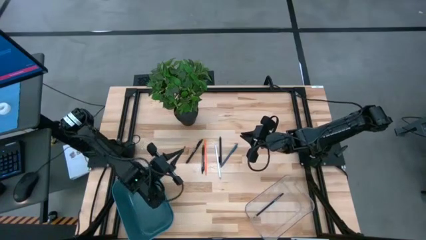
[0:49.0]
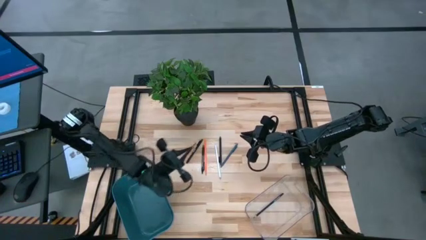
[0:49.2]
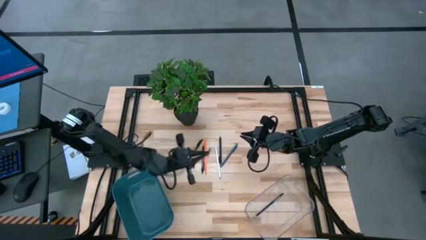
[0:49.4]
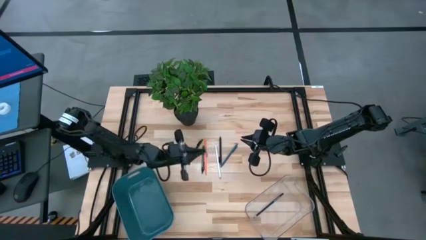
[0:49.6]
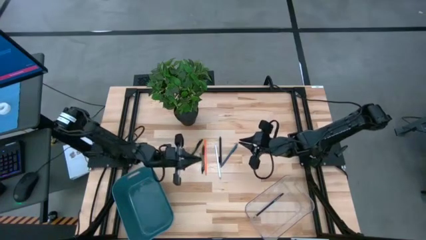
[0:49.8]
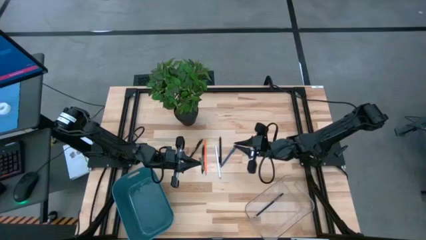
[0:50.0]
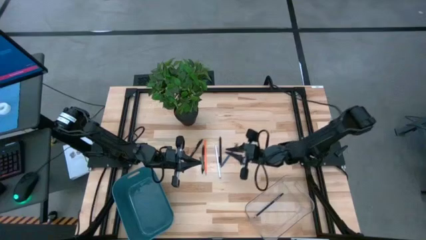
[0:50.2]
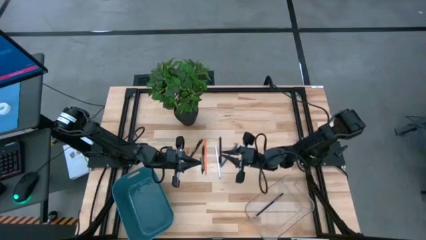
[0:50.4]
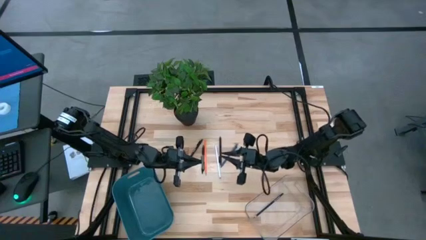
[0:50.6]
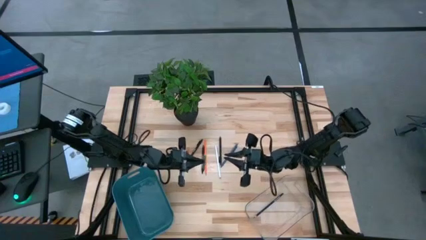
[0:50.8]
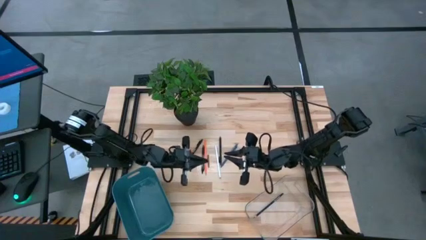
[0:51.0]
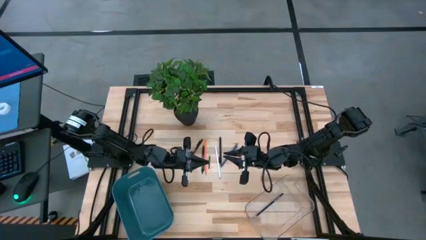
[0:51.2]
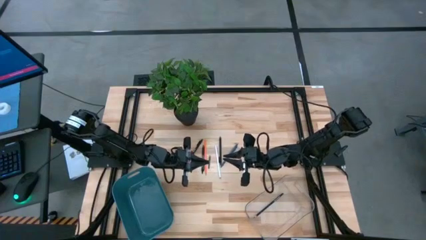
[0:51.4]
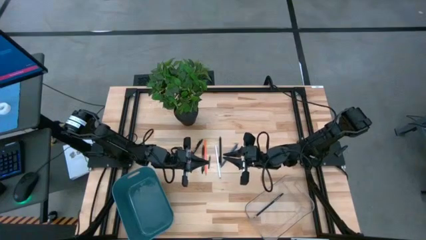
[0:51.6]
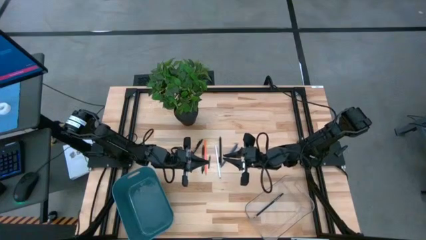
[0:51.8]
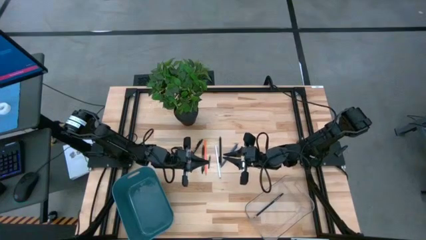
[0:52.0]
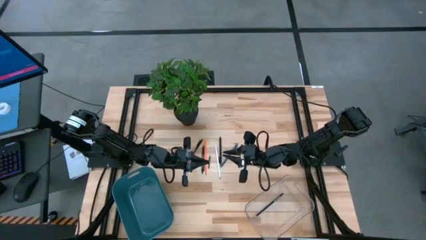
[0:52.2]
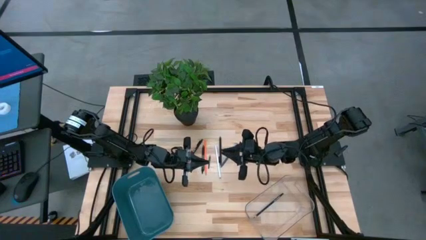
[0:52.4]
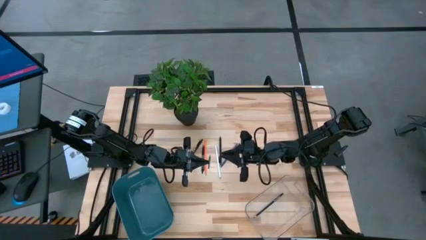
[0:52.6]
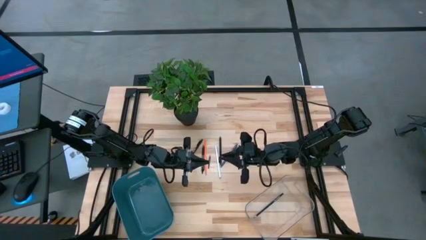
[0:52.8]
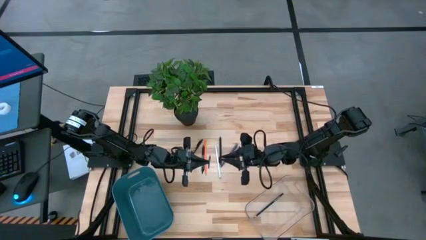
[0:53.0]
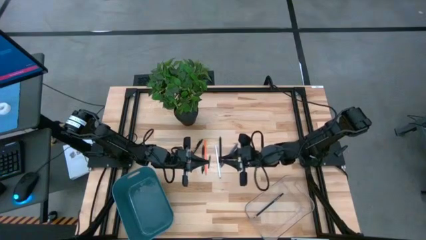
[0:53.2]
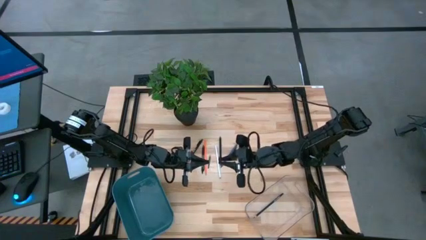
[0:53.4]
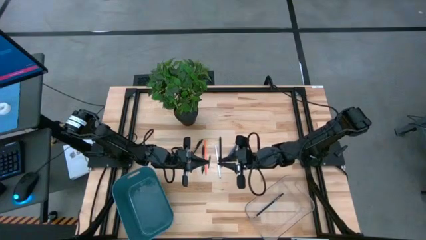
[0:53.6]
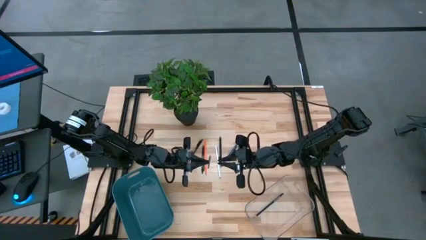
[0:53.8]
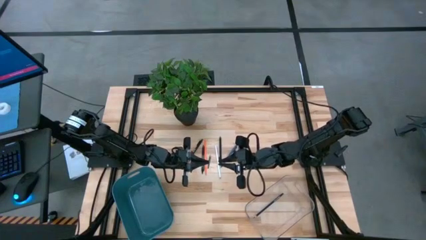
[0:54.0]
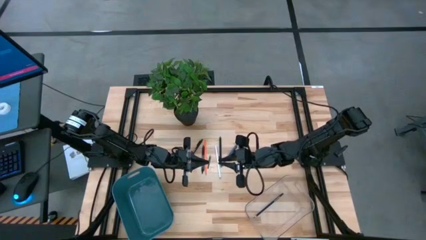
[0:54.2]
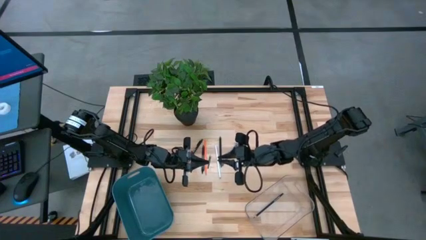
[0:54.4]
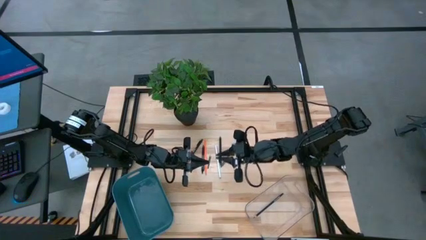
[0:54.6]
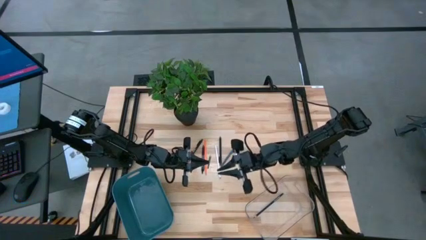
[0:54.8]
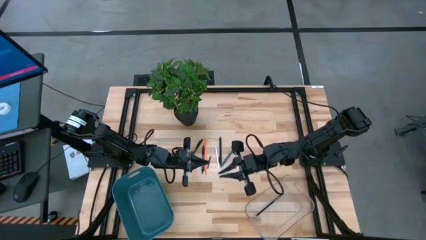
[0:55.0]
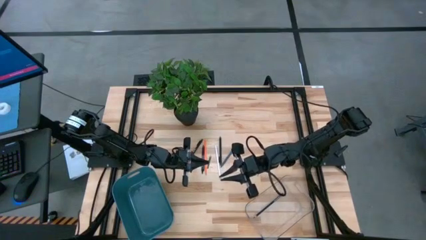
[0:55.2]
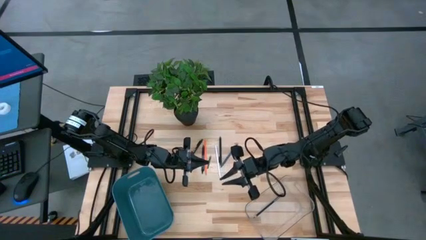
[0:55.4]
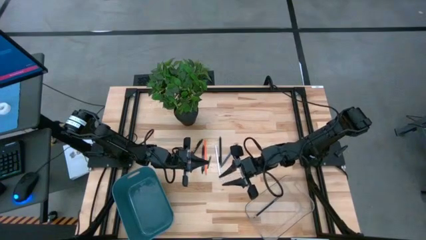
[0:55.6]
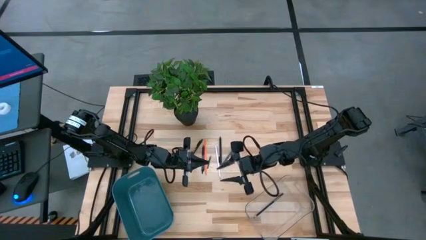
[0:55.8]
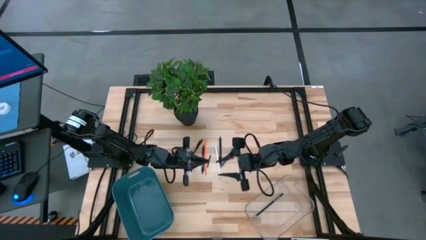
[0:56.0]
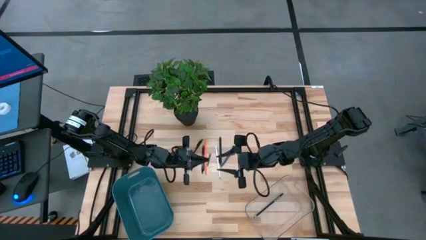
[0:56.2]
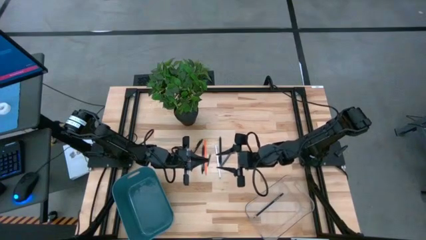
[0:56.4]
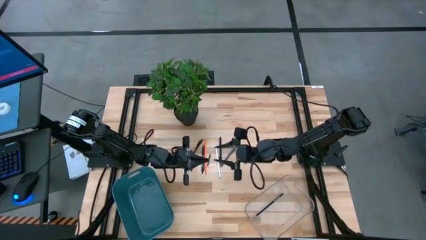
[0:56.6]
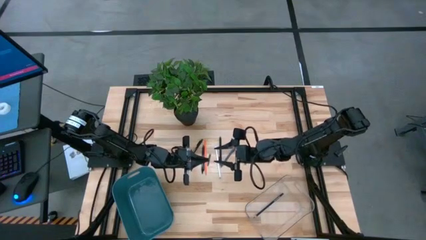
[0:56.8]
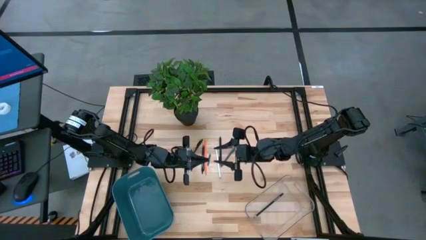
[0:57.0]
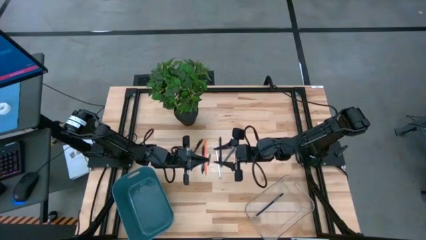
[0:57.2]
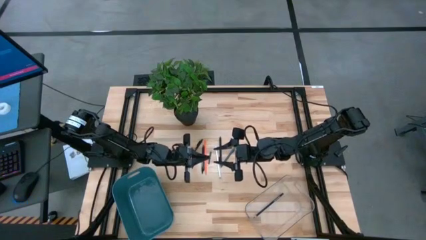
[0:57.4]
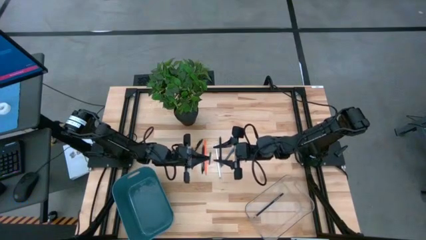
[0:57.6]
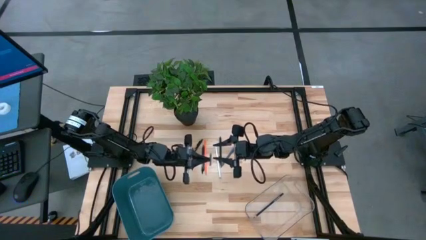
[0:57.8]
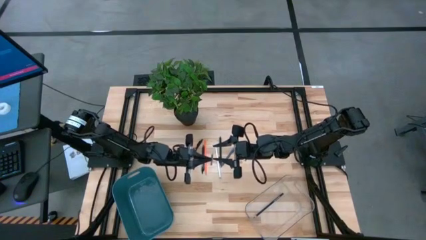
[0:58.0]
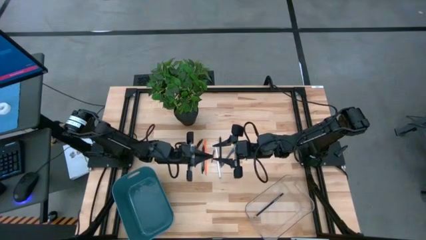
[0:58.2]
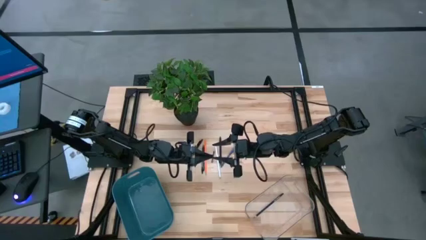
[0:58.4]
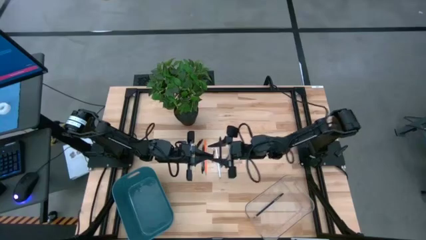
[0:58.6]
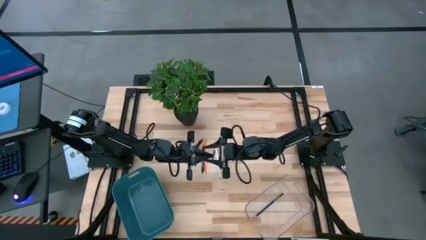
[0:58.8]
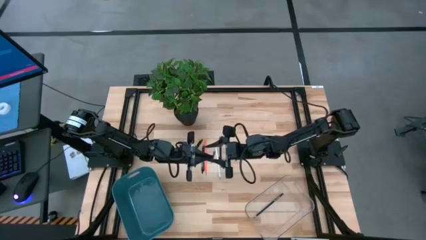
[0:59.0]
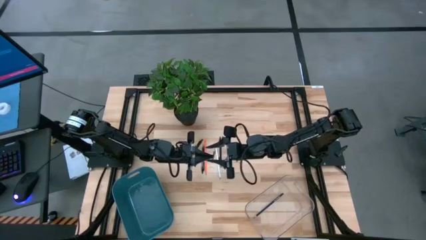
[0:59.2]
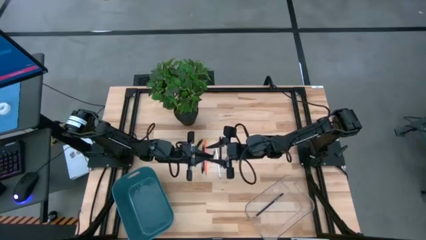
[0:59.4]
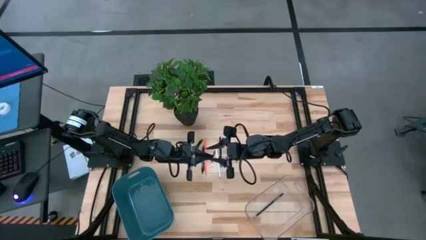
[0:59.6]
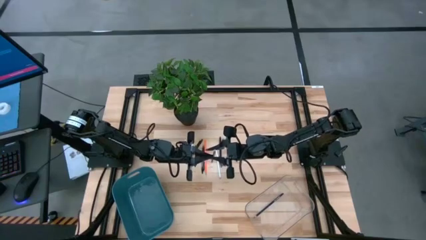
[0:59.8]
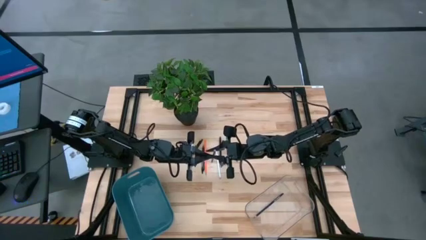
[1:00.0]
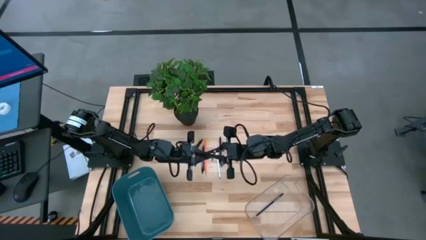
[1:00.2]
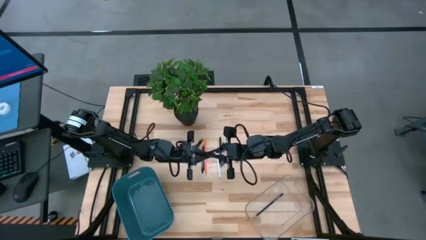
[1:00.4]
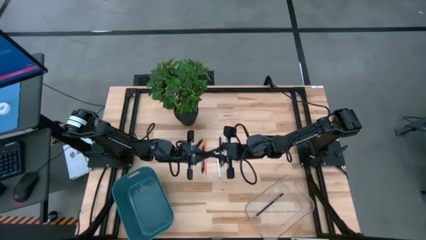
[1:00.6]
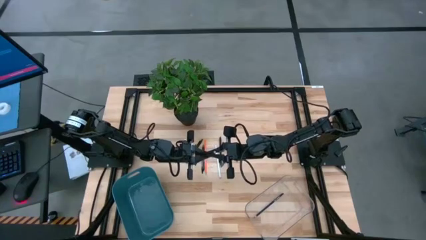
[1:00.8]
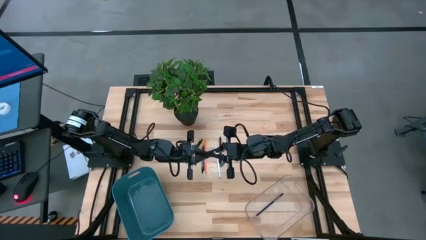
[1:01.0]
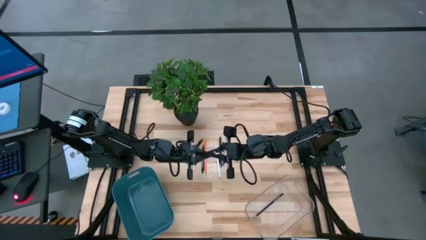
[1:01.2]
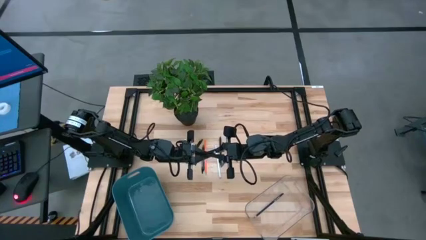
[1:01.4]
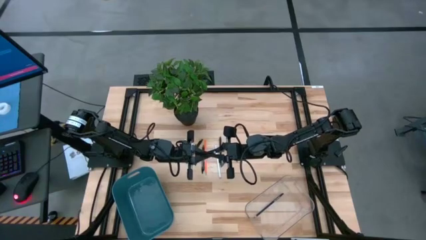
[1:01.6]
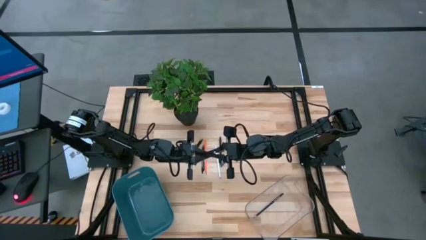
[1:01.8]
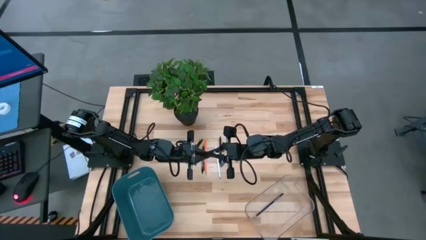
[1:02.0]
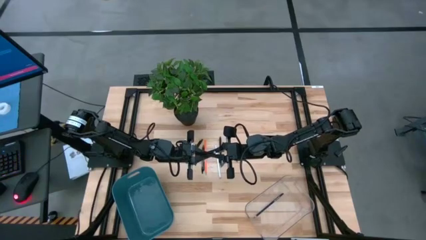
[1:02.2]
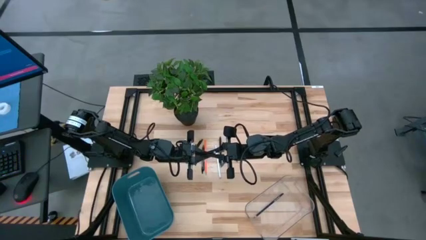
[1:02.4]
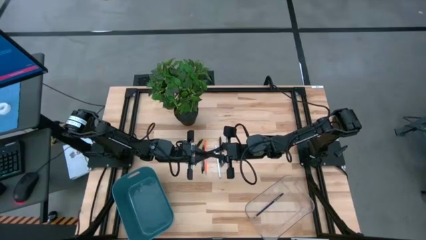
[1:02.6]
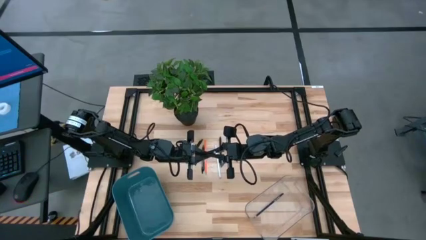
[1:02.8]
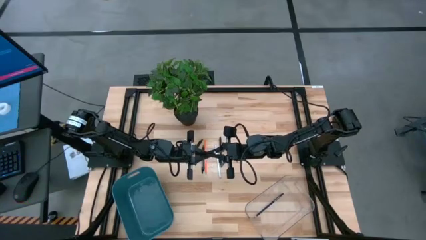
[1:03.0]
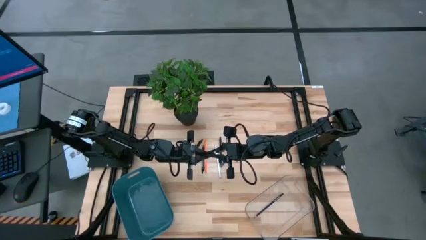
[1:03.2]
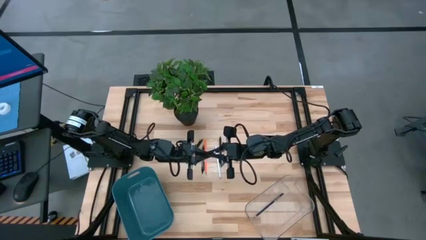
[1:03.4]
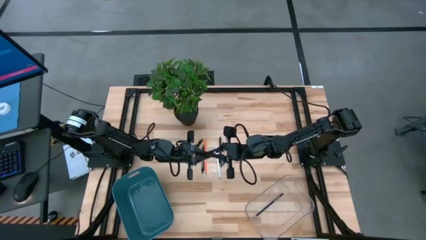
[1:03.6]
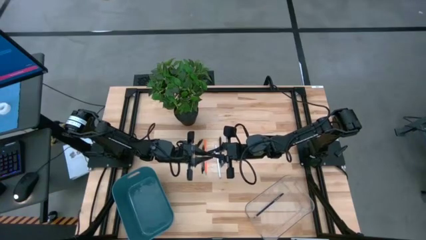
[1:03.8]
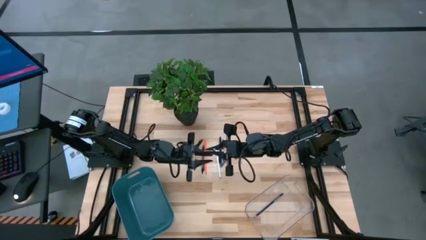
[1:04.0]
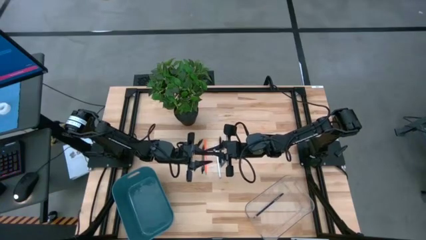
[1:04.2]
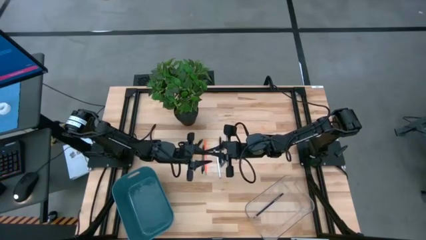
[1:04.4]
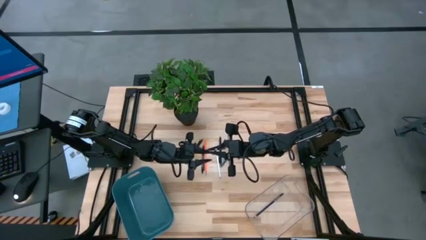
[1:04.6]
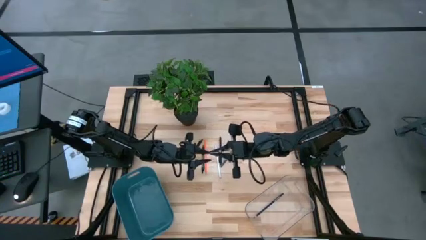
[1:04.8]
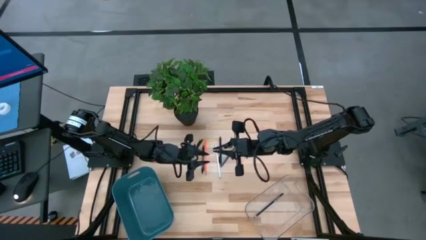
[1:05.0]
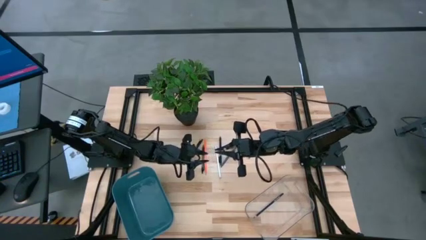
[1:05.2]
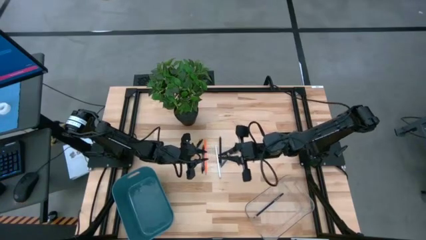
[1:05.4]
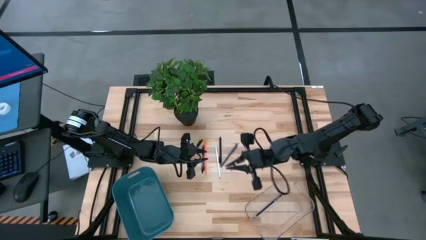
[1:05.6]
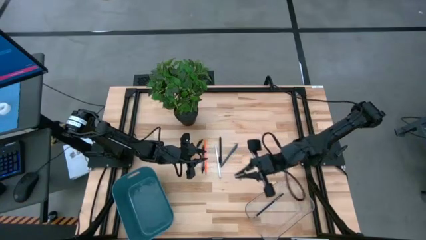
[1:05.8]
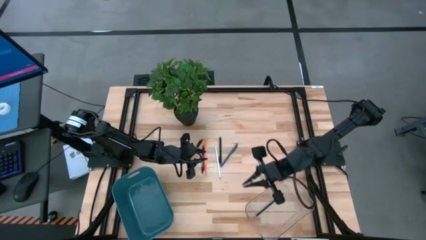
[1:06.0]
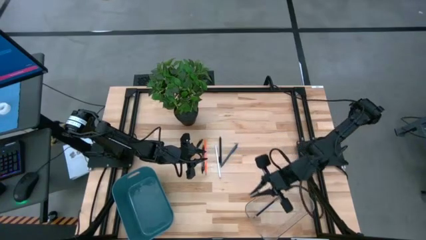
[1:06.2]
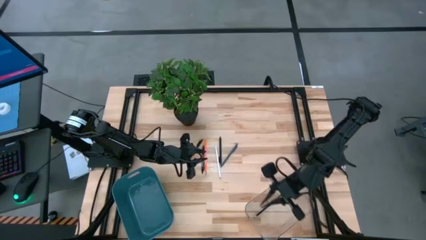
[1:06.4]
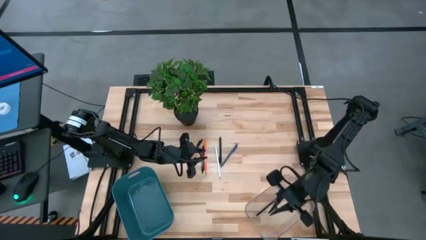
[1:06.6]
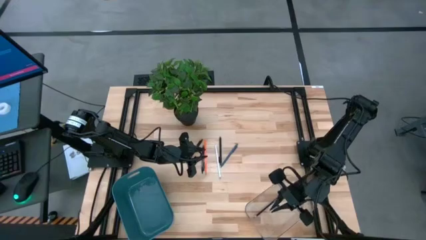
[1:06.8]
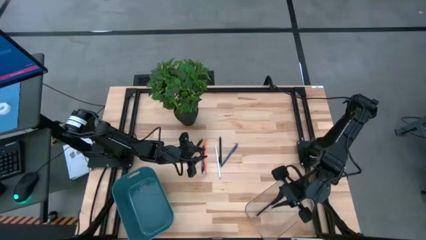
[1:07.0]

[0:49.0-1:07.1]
Task: Sort pens & pencils
Put the green pencil into the transparent bin
